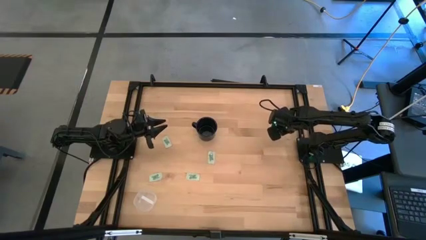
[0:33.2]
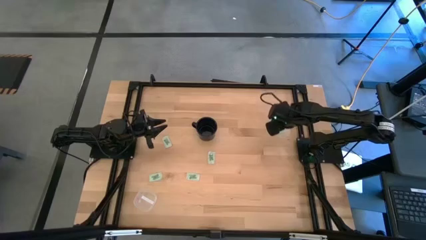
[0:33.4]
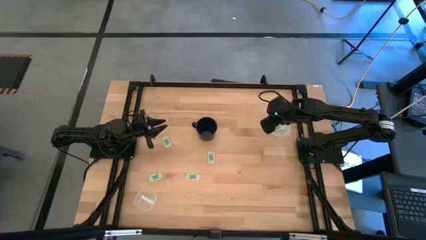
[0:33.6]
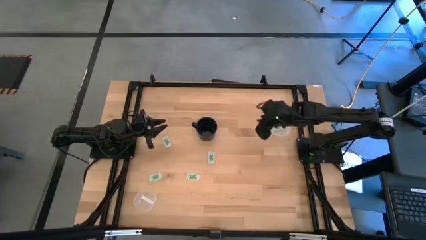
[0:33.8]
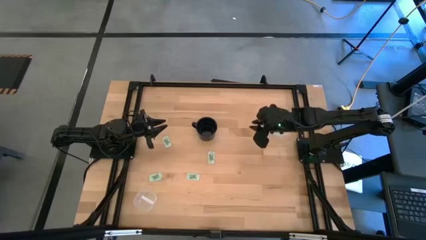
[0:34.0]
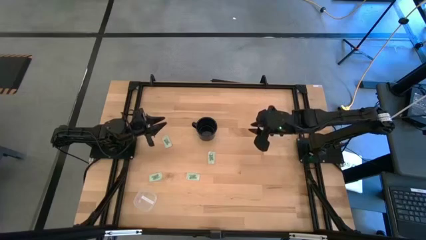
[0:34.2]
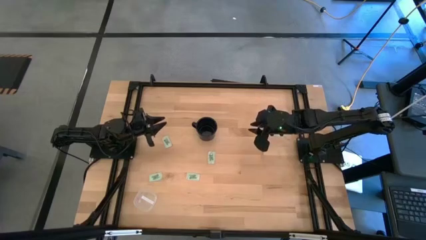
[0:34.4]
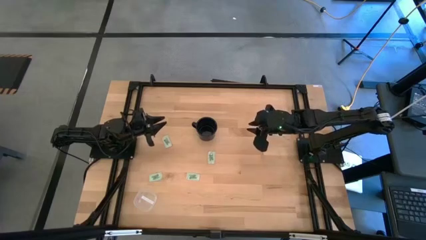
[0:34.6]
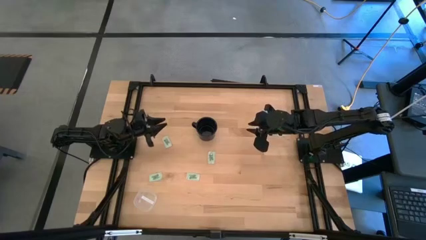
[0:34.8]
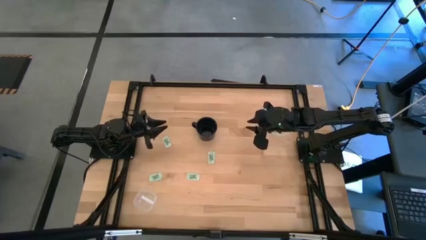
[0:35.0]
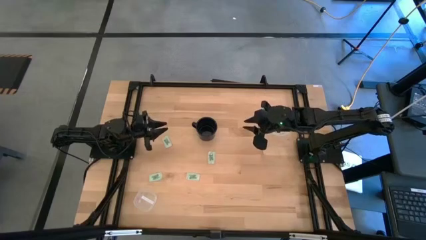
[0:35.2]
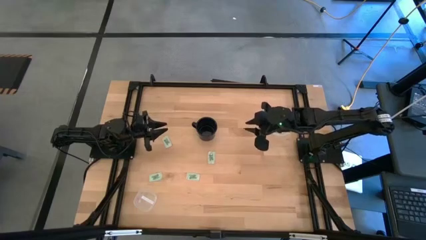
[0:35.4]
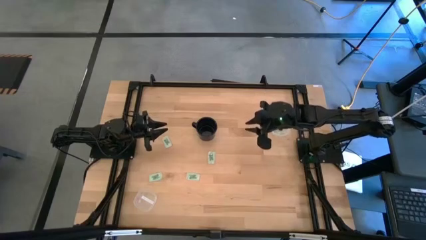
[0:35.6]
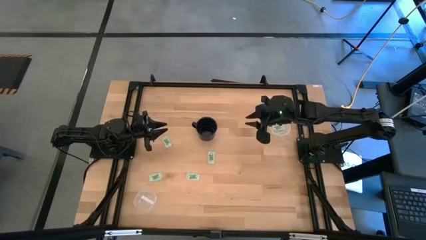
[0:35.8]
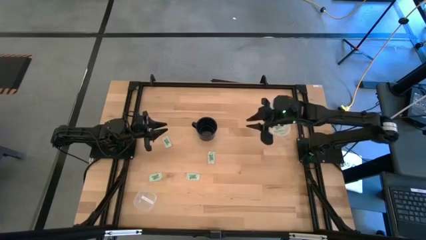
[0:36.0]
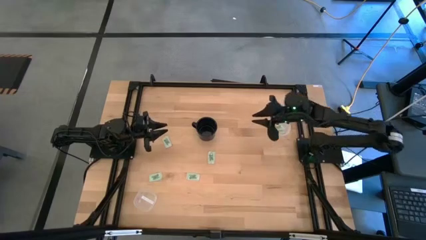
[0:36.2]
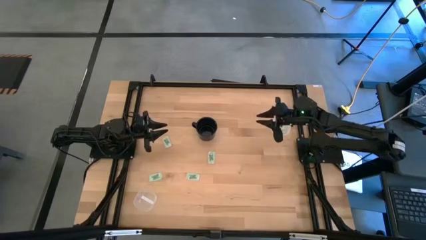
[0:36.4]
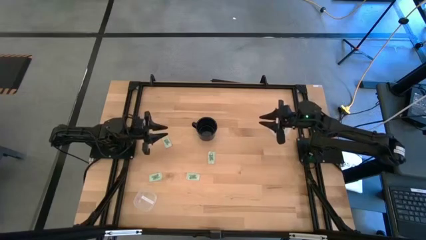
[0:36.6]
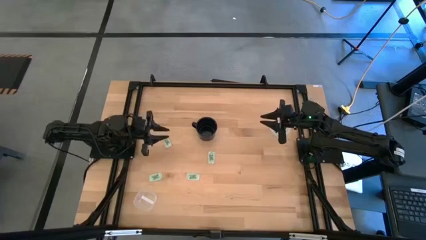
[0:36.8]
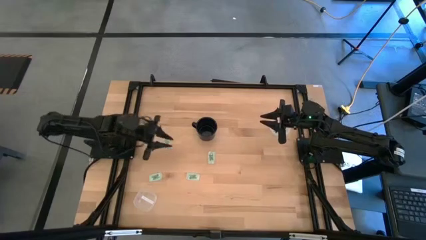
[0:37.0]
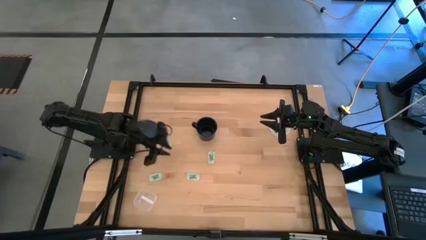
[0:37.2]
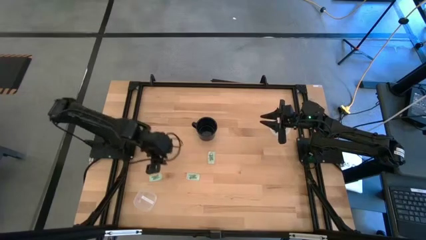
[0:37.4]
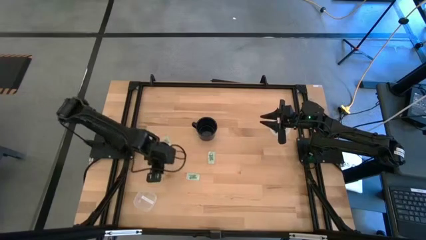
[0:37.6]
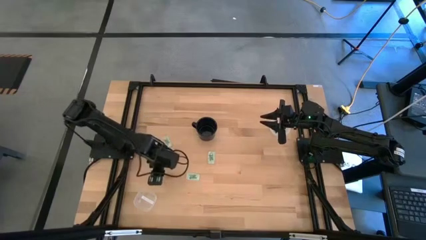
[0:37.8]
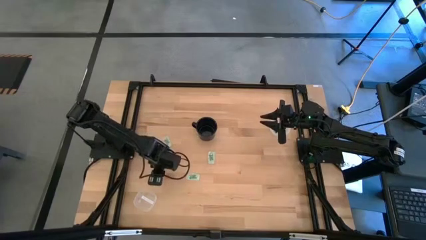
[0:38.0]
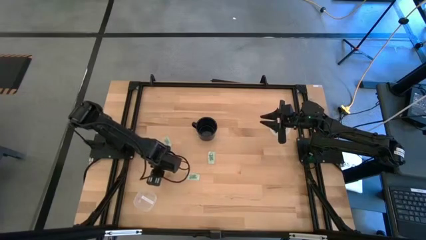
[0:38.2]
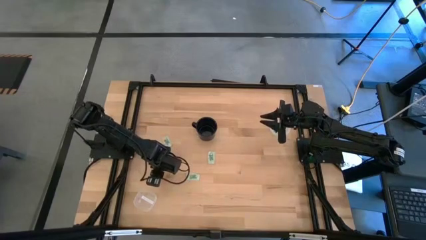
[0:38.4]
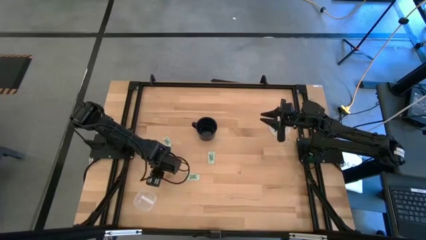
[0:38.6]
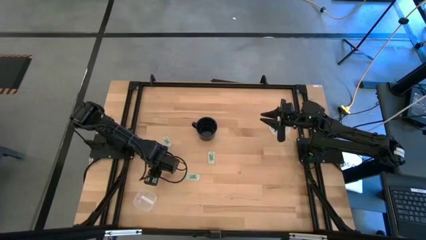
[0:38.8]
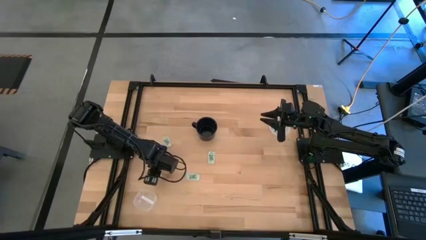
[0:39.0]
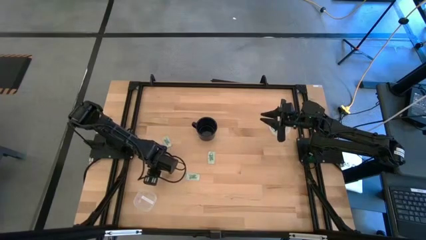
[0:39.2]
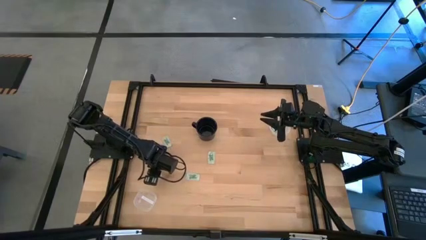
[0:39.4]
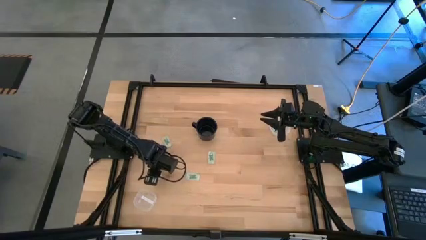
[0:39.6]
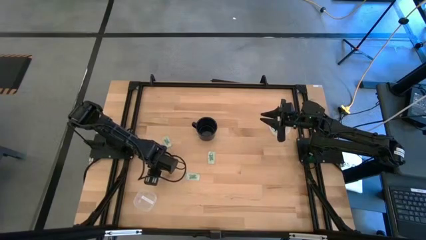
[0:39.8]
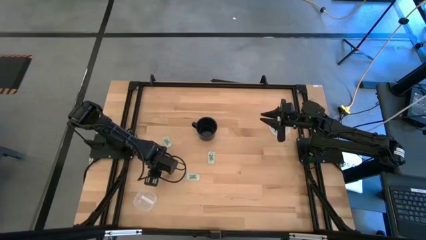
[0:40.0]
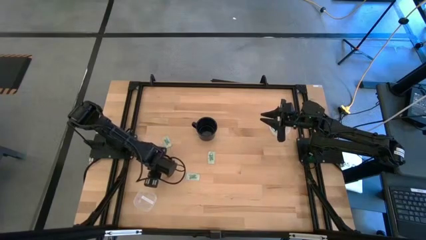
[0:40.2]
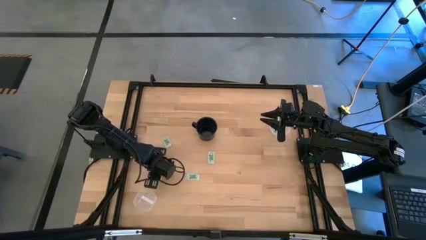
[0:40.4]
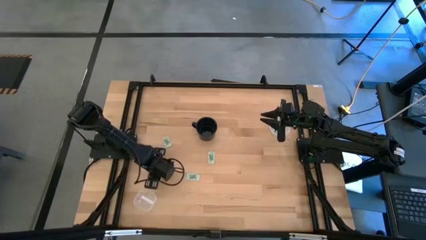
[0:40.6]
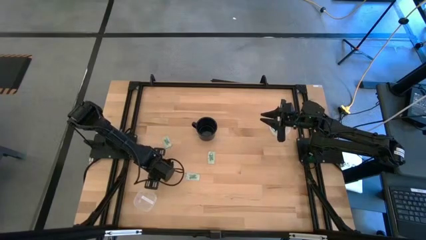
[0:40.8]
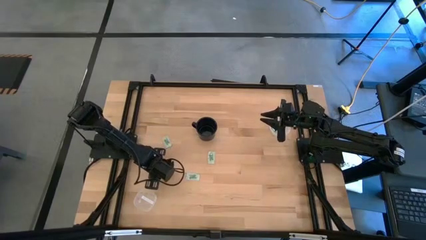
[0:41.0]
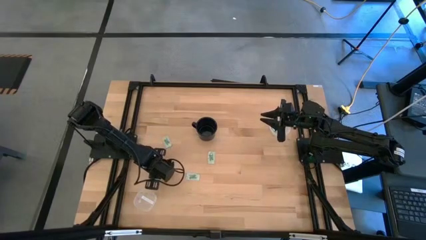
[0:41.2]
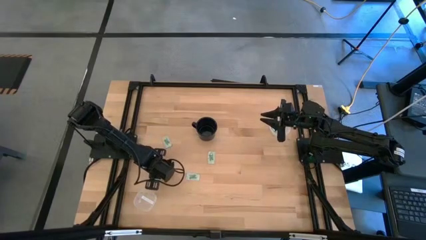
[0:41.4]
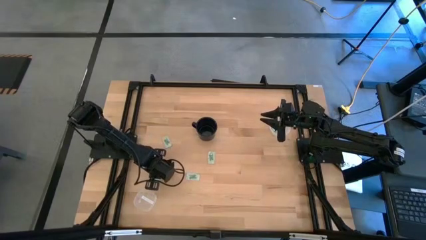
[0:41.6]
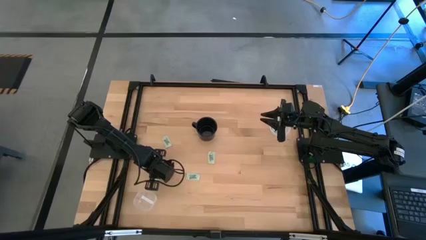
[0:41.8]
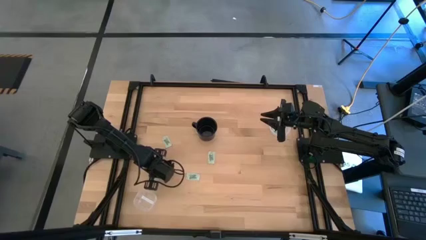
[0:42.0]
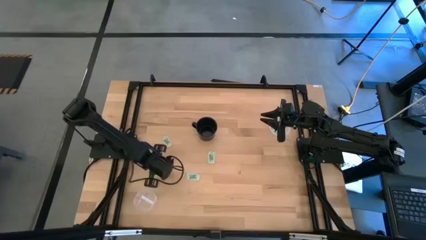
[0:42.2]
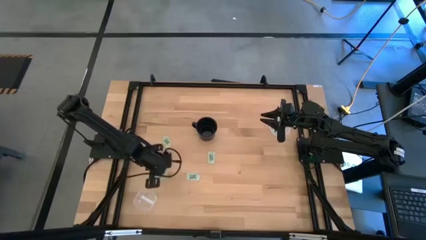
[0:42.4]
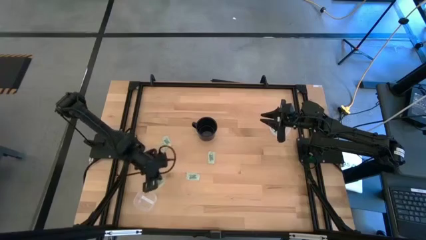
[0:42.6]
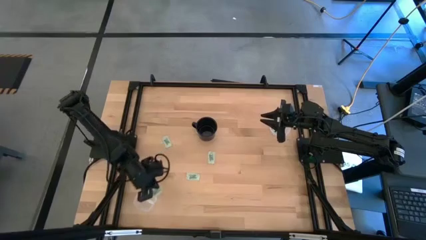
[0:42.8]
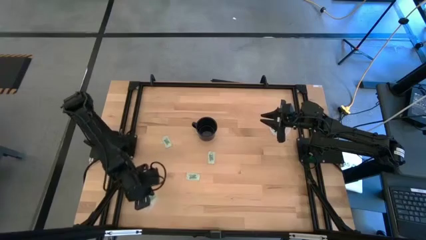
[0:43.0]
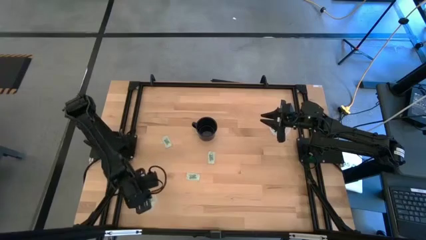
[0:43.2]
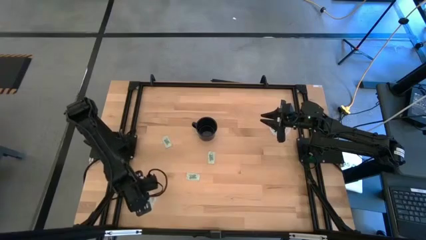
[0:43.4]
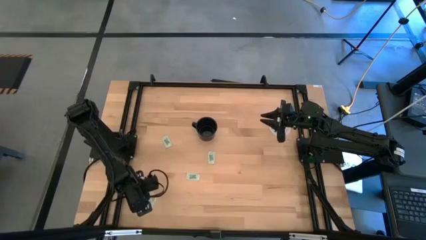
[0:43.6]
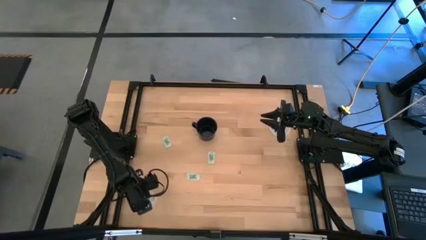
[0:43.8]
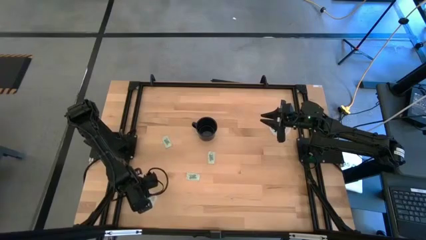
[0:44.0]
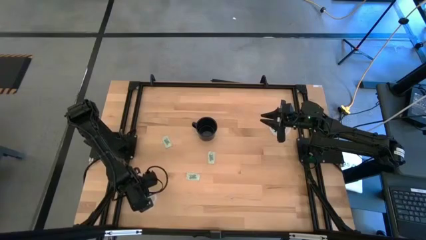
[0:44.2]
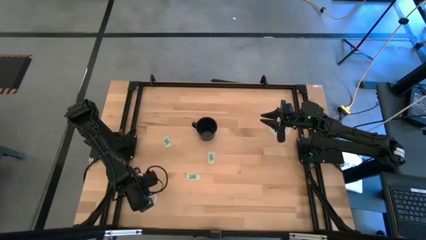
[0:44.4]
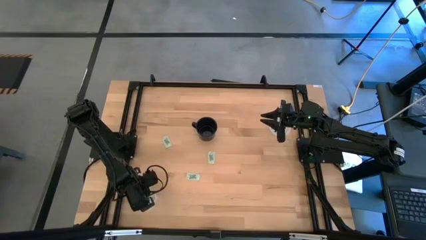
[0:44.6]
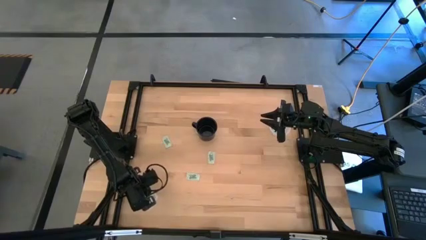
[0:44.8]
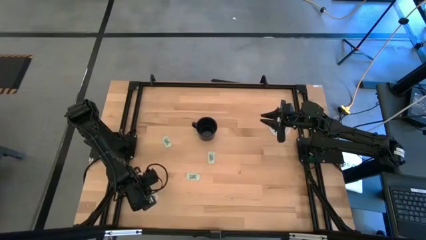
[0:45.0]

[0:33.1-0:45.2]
Task: Pick and place Stevia / Truvia into bins
Put the stevia packet into the square transparent container

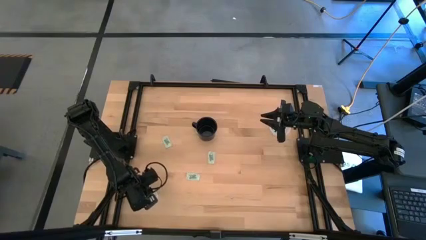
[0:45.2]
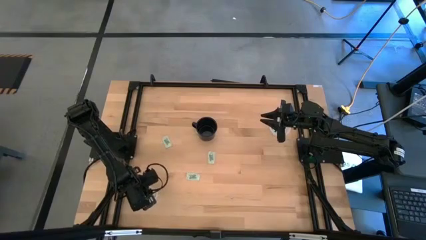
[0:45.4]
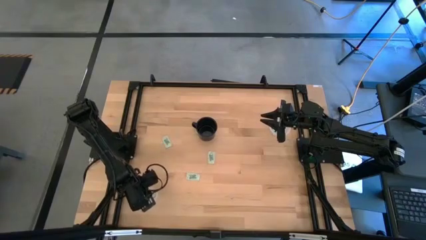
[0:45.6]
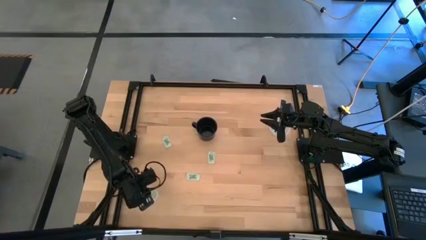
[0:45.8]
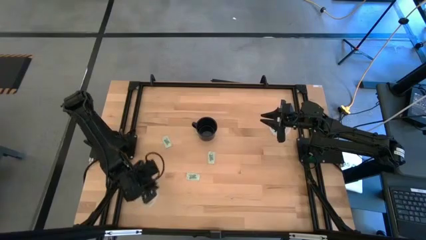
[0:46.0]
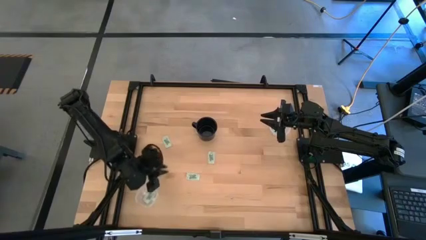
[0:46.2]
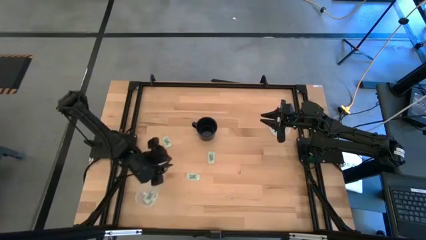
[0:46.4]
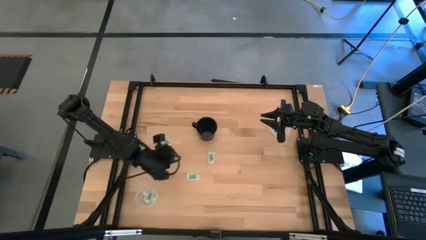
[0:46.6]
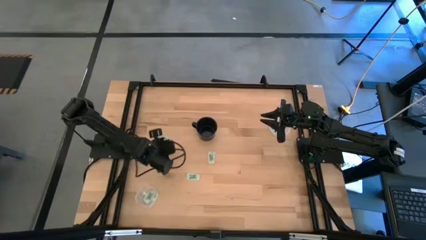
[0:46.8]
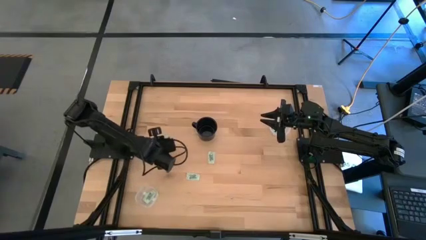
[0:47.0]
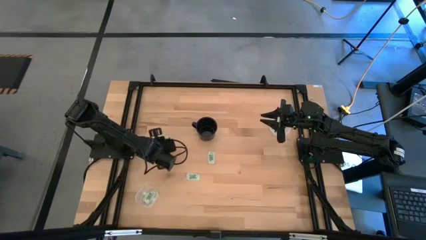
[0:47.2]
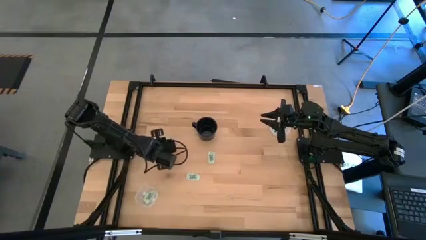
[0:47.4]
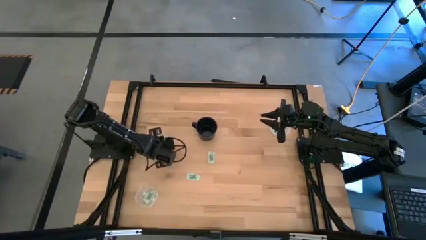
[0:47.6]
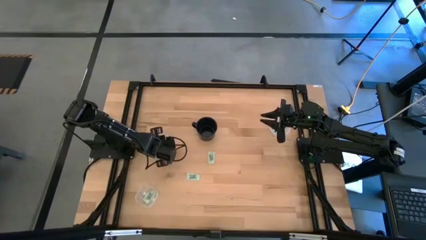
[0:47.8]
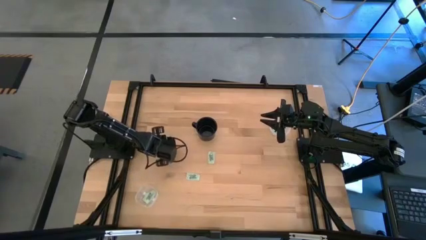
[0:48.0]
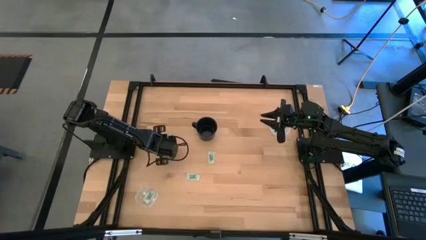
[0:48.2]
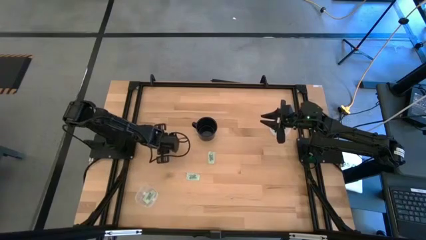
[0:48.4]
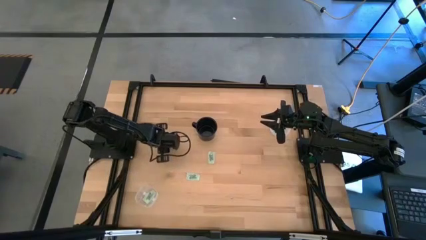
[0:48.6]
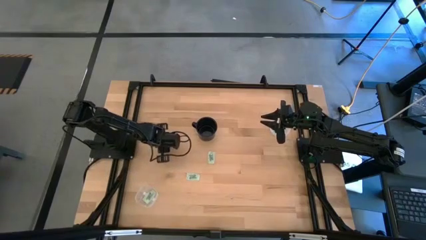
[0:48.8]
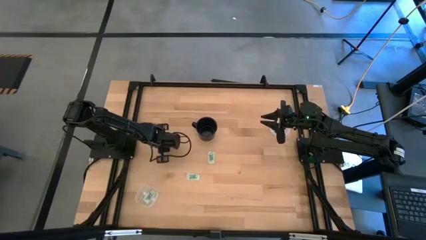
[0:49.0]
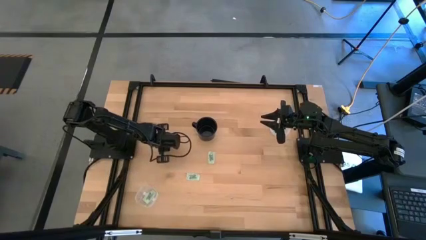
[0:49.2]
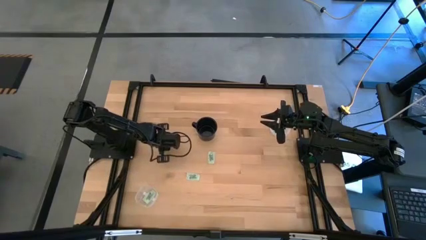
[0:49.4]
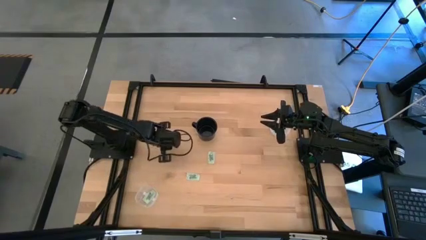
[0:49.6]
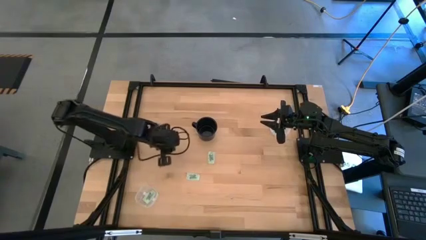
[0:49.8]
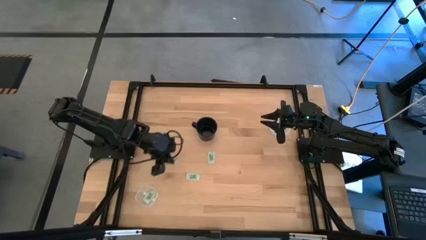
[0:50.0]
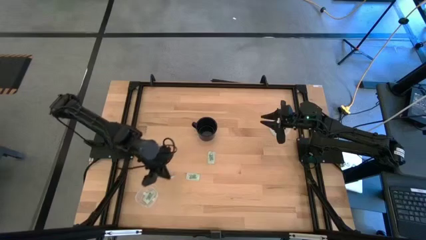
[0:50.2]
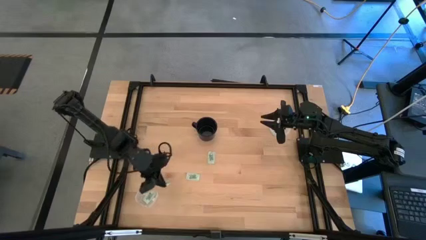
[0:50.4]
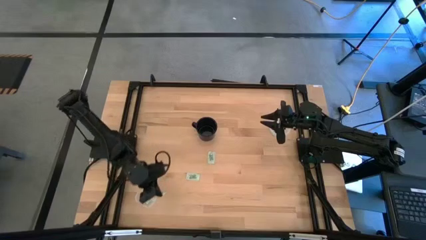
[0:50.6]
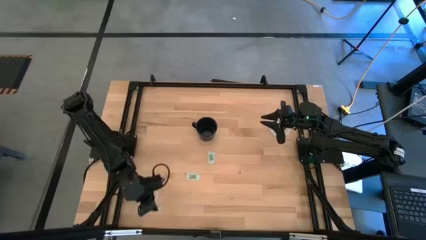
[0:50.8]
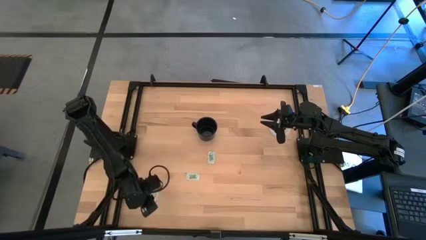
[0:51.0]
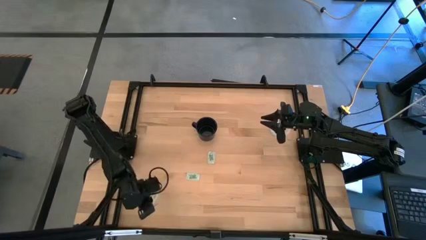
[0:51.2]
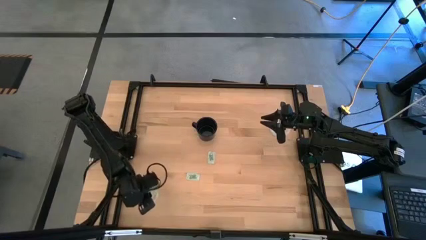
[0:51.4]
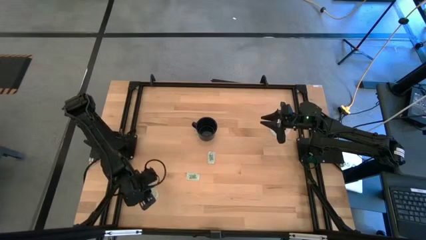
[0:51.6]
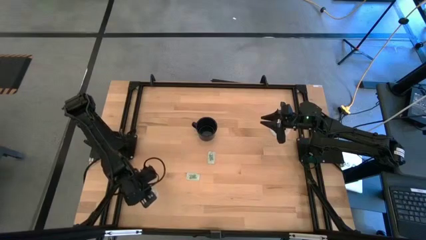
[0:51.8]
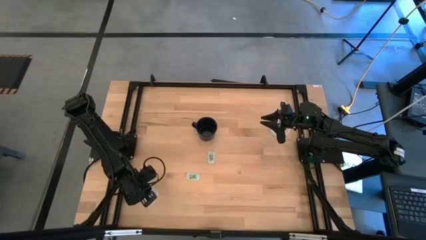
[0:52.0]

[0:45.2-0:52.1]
Put the stevia packet into the square transparent container
